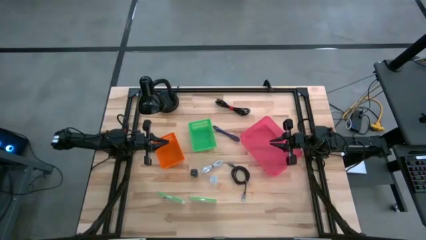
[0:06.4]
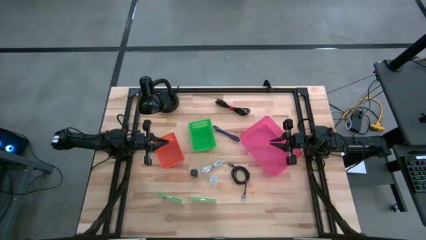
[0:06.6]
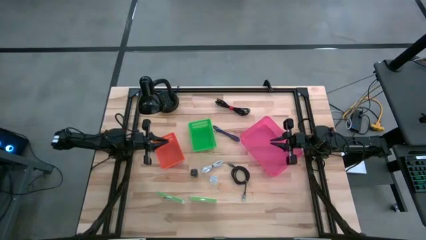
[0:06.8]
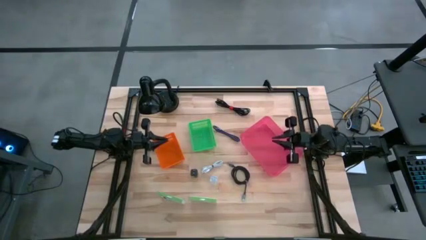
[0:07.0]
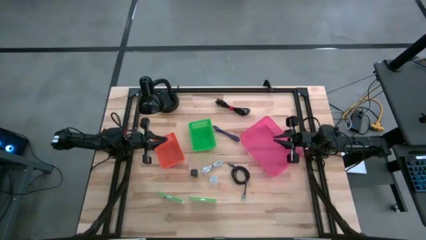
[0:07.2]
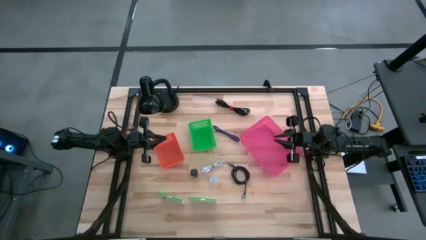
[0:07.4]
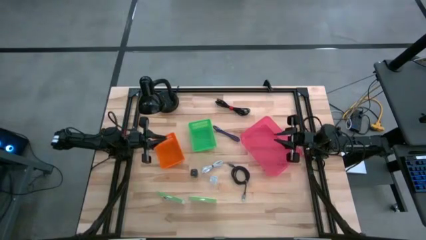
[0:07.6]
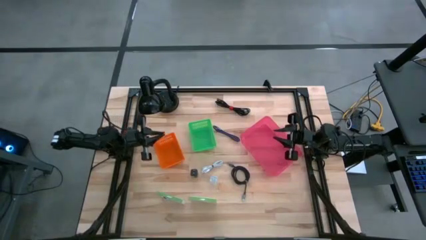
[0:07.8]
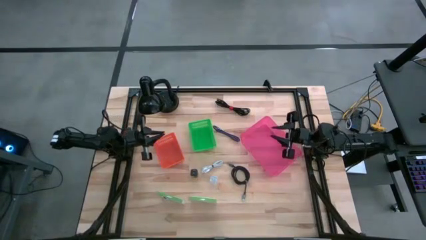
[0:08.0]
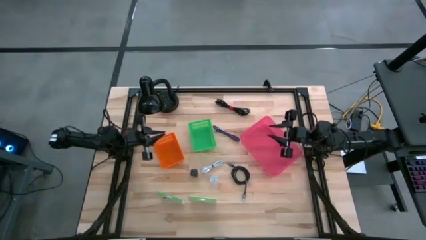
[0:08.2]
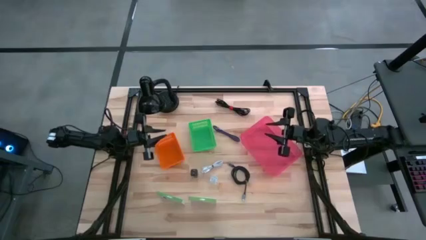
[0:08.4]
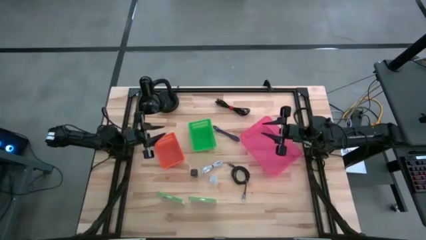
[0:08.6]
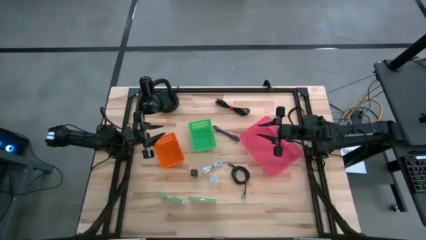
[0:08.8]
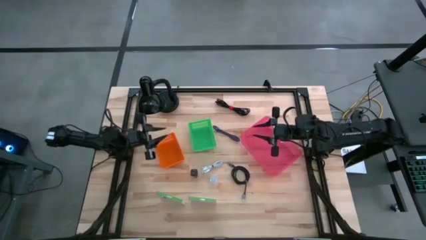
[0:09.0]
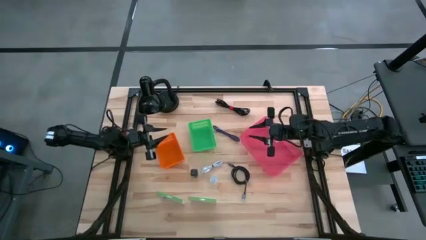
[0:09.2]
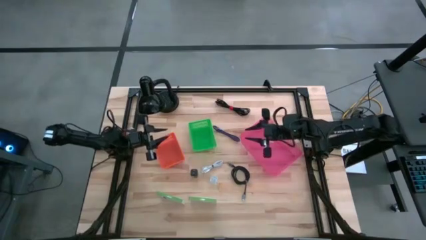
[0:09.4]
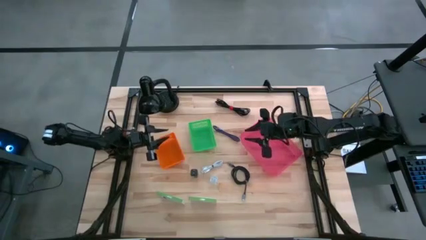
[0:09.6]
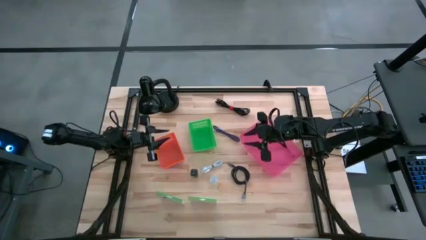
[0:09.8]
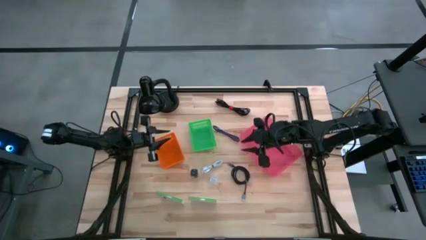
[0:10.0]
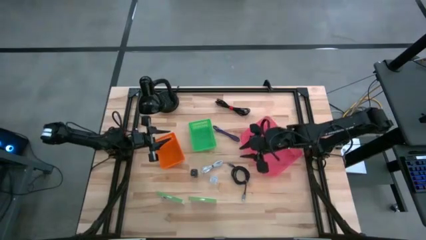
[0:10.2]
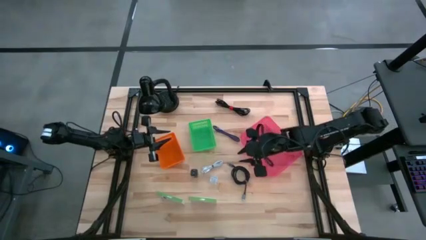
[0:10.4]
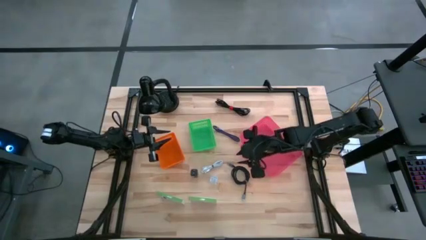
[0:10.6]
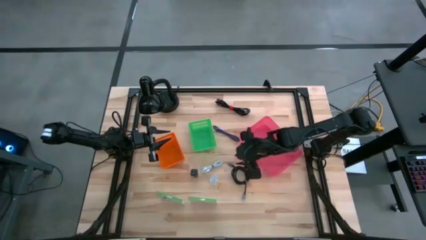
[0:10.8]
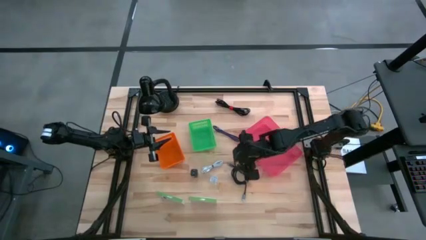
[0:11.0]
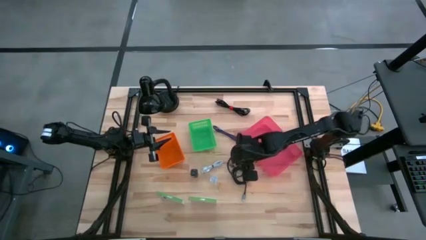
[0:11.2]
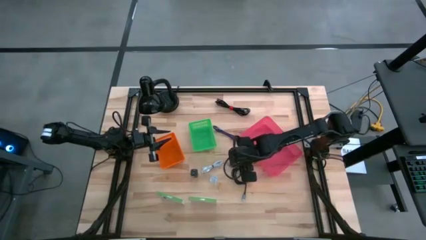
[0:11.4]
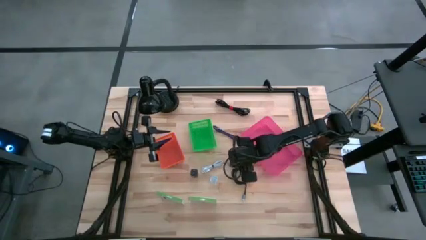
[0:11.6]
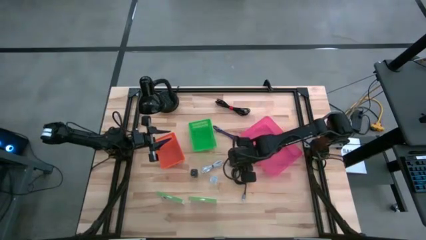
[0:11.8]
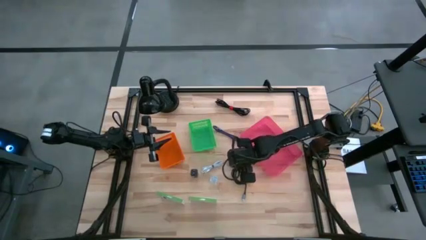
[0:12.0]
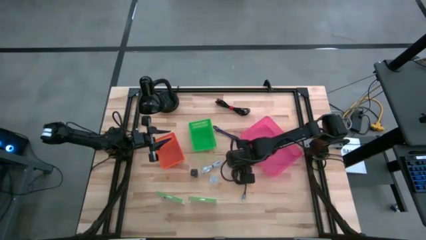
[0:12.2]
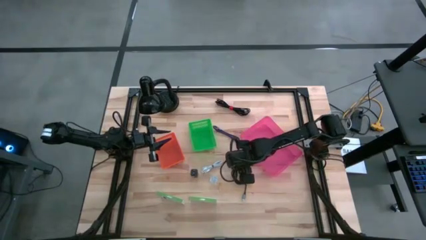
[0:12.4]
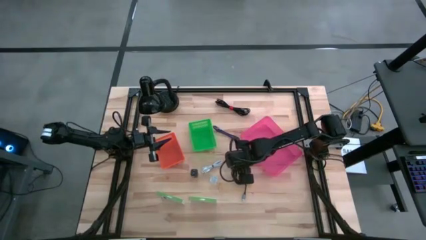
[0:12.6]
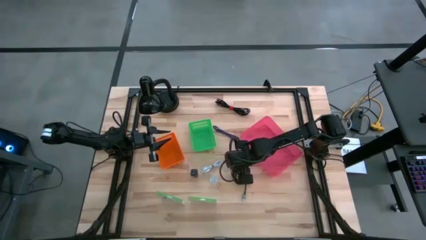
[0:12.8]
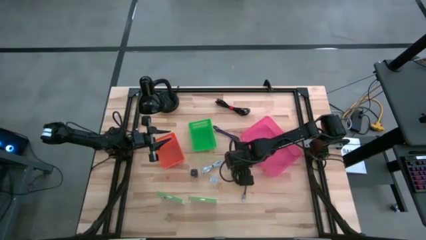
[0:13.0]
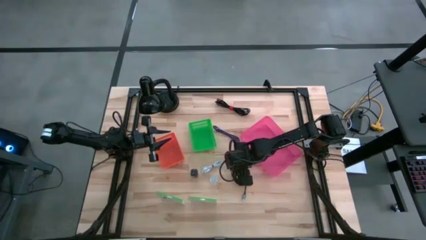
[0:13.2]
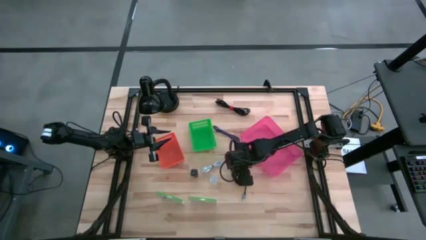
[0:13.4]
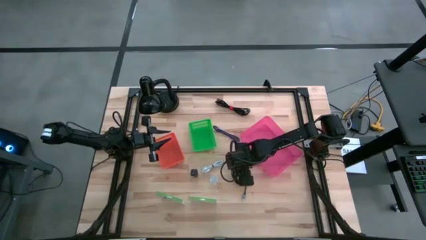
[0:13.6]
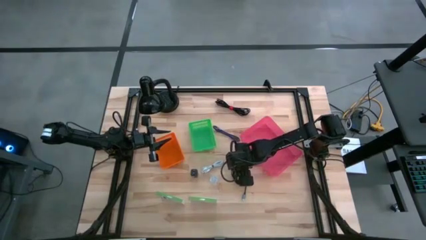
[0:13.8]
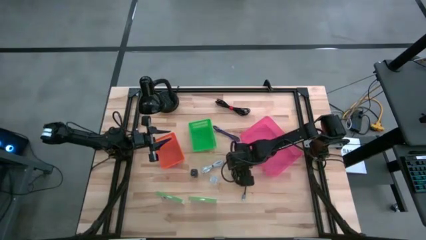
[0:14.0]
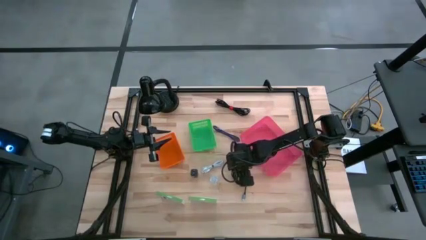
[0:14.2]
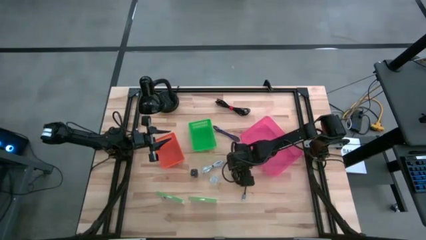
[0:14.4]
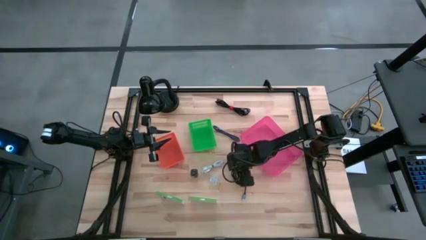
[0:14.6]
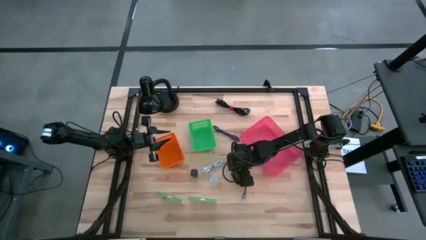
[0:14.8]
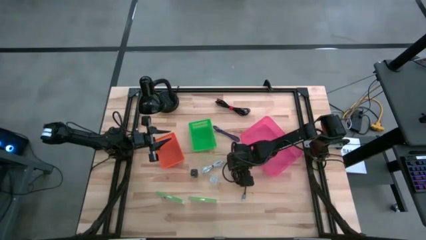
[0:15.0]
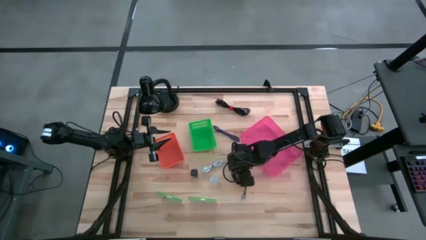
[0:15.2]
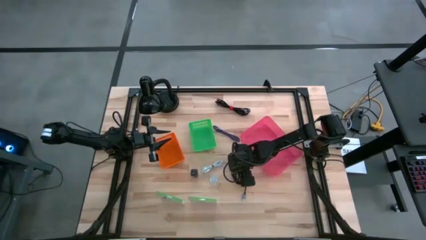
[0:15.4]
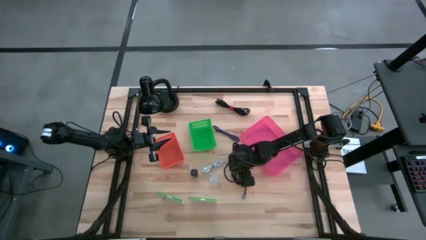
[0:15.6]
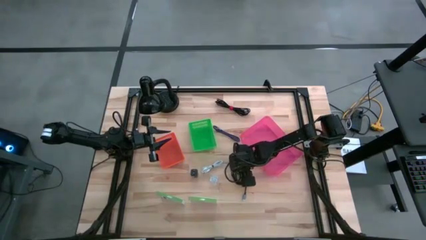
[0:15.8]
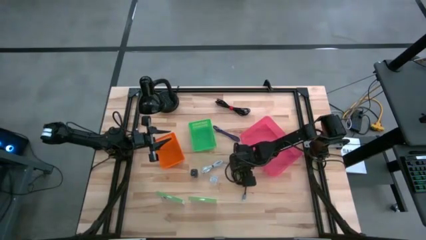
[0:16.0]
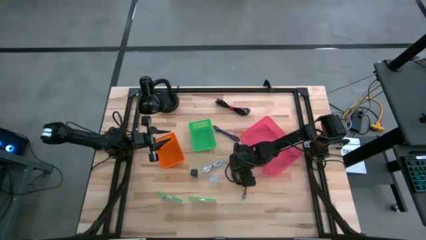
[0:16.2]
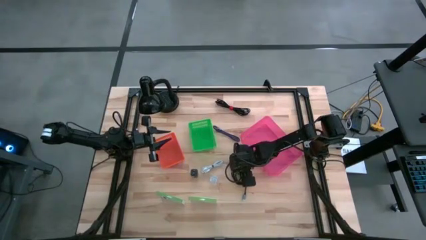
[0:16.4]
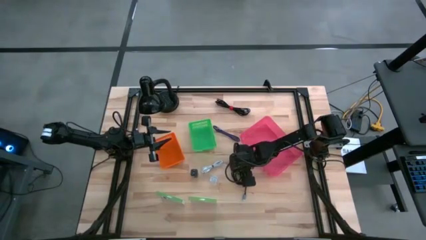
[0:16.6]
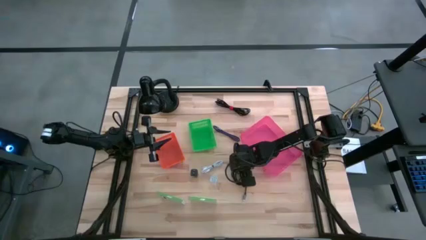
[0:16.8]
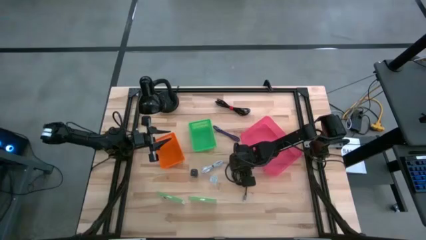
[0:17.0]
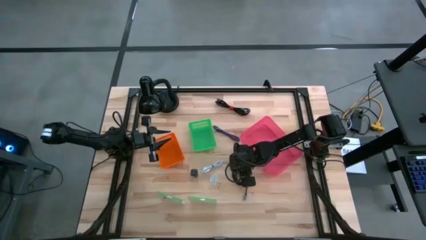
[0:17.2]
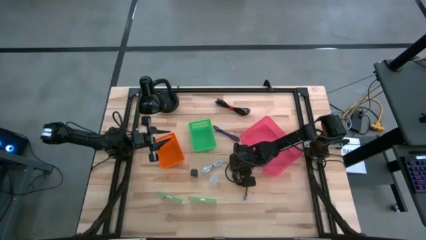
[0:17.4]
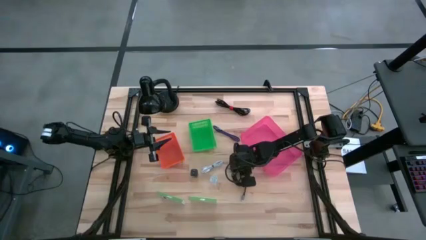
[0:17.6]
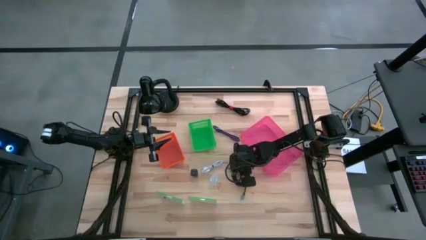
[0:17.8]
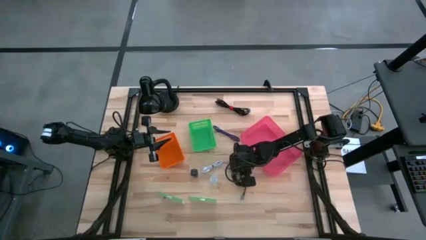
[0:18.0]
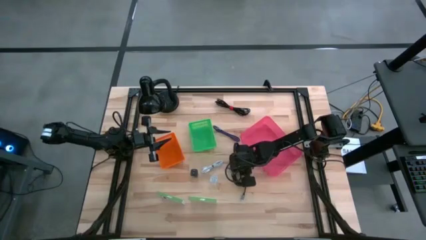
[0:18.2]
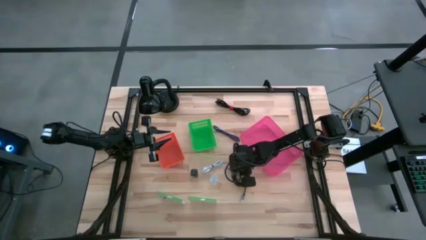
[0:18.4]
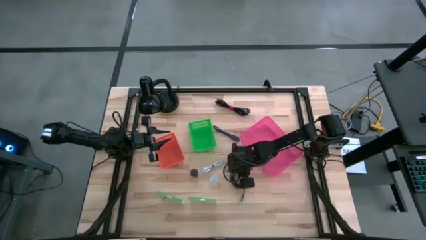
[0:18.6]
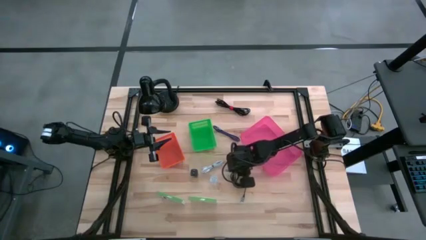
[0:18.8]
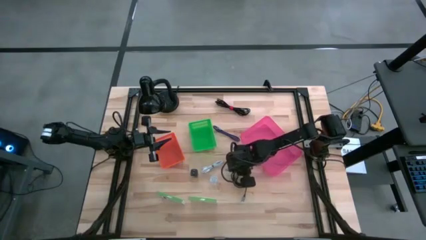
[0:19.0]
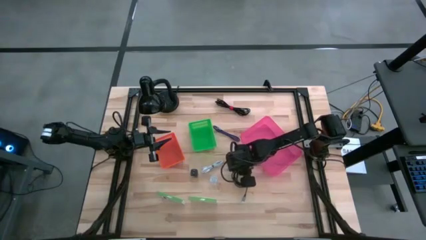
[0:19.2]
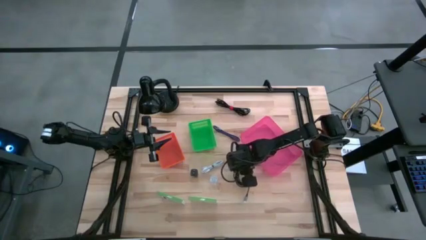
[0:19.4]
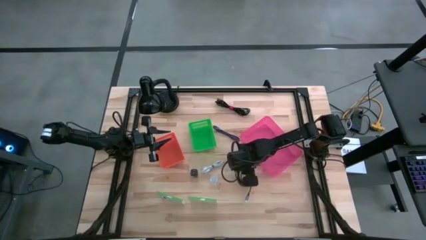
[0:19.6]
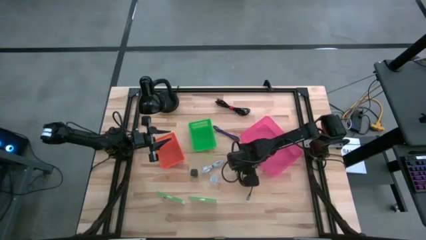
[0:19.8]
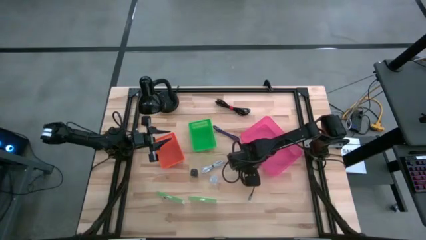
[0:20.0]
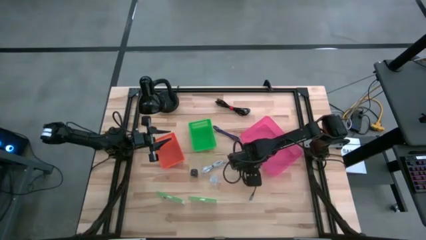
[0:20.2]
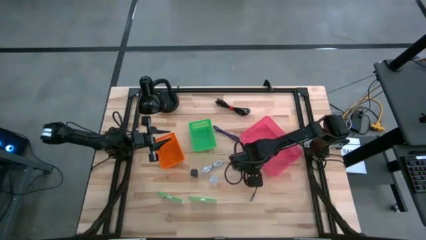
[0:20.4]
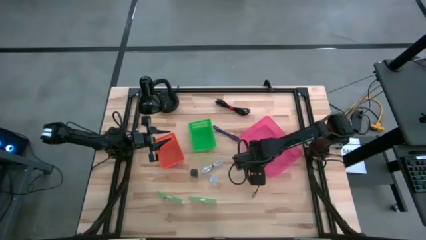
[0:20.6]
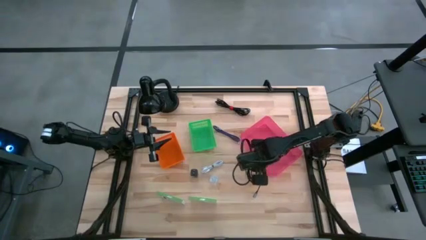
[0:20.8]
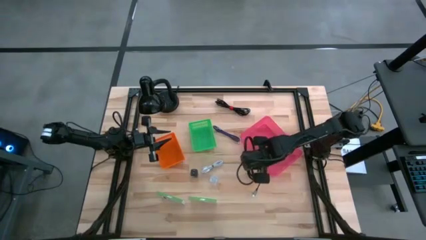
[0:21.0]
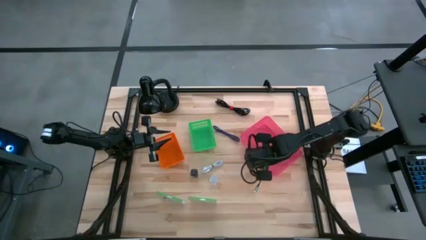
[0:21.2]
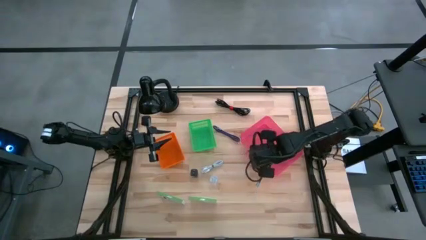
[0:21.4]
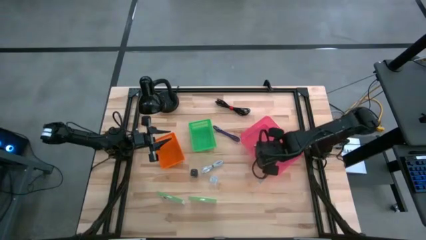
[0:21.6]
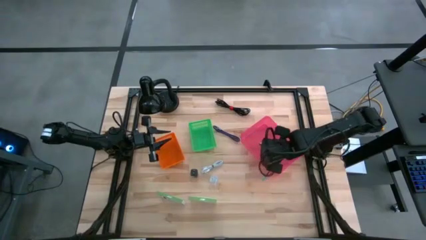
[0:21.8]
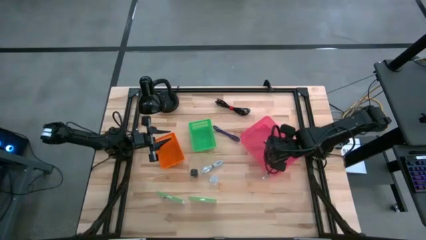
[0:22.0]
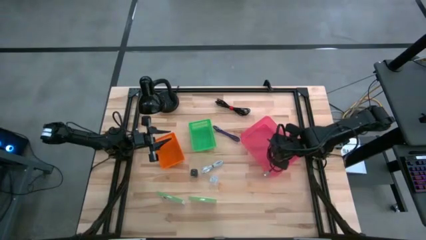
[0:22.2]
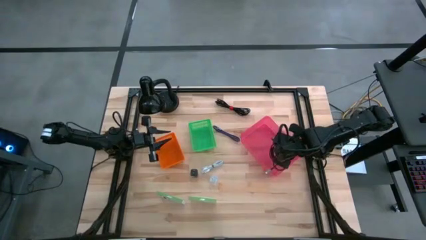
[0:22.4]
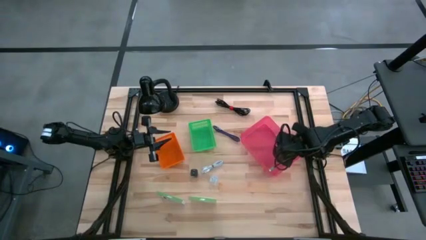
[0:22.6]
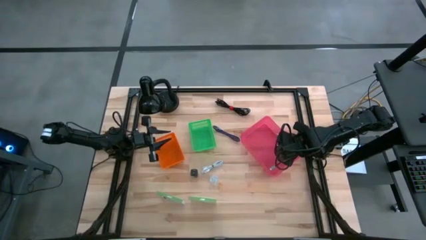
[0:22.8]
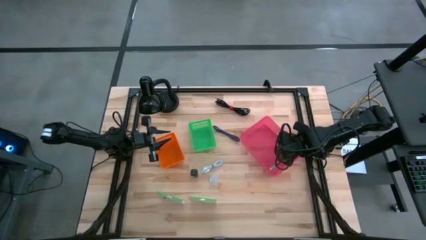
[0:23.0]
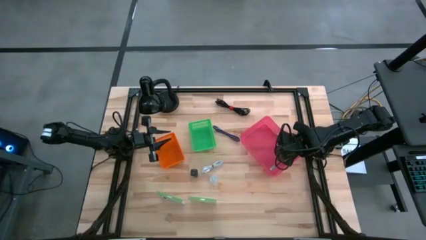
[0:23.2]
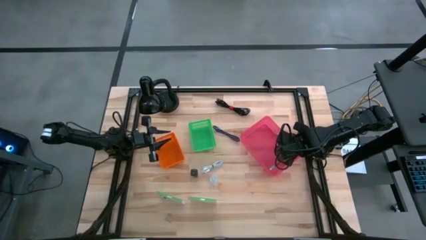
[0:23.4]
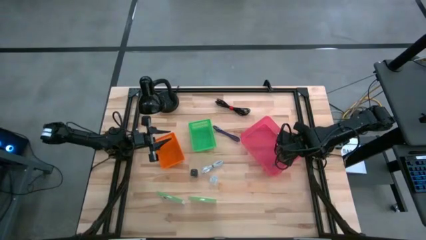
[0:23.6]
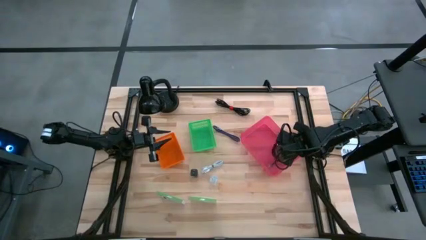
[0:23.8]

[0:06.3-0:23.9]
Task: Pick and place items into bin
Put the bottom black charger cable into the pink bin
